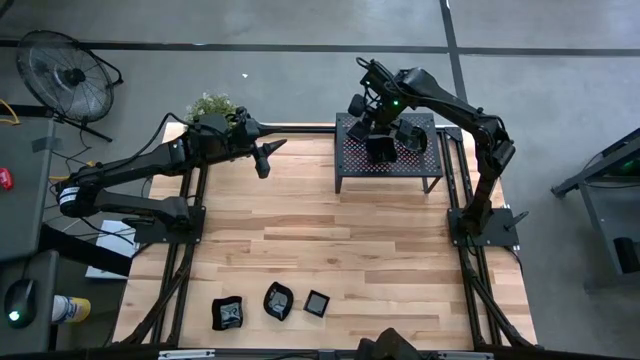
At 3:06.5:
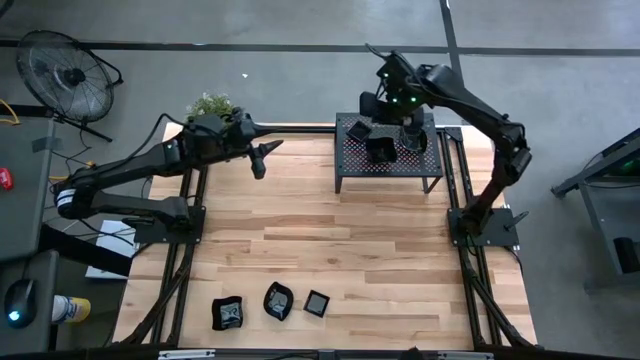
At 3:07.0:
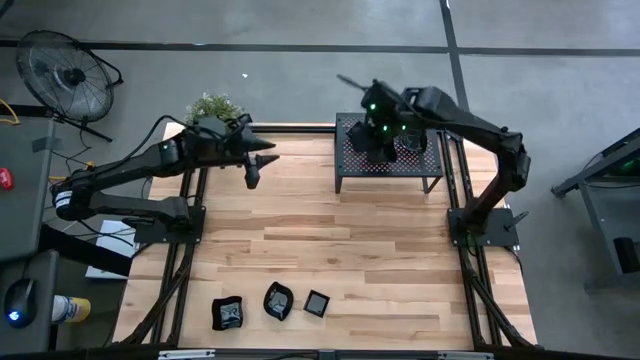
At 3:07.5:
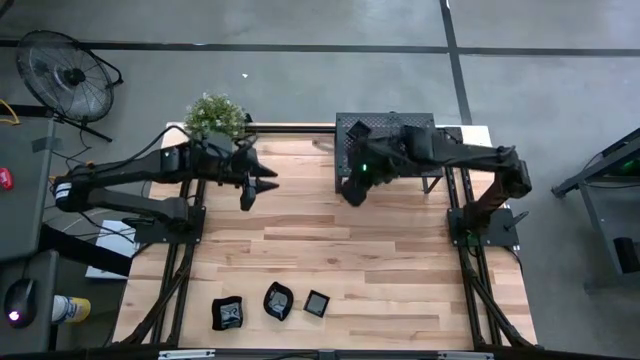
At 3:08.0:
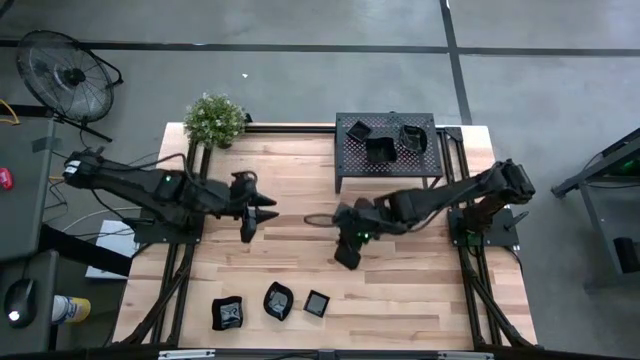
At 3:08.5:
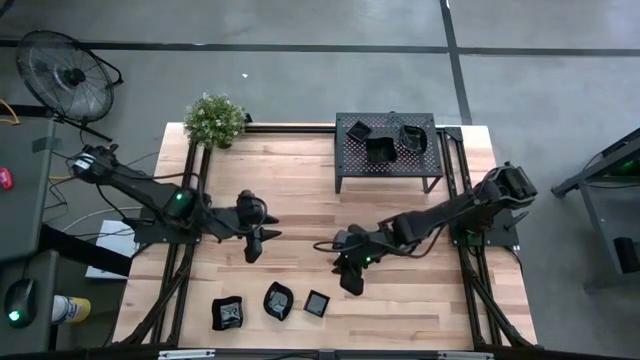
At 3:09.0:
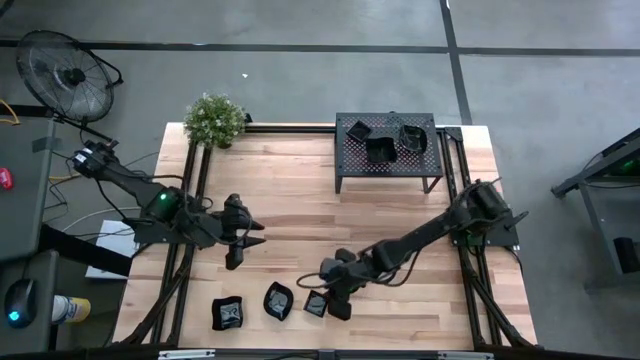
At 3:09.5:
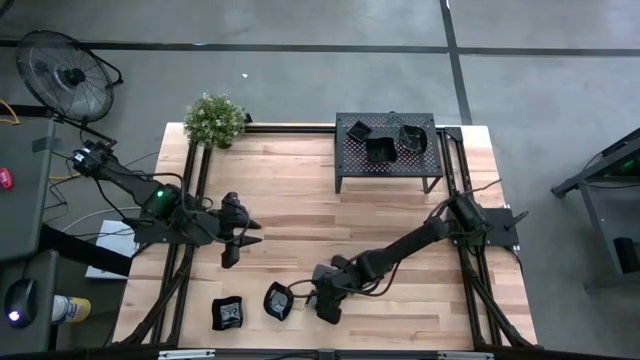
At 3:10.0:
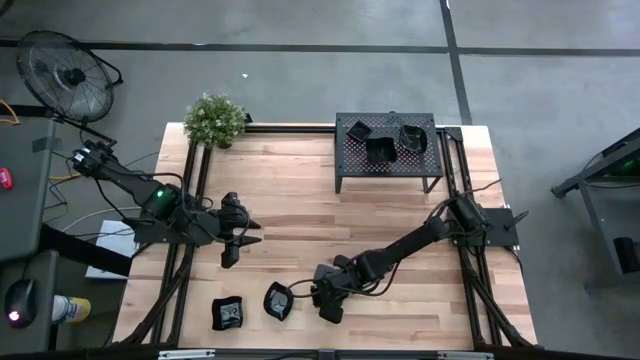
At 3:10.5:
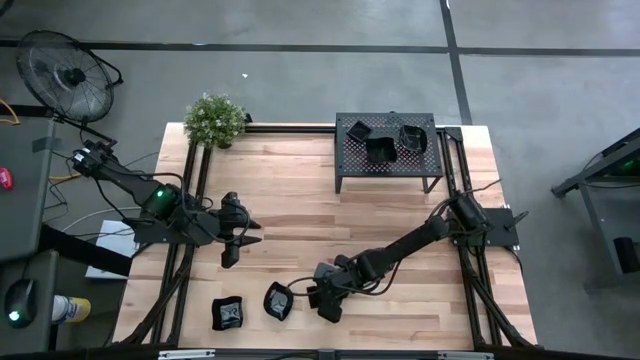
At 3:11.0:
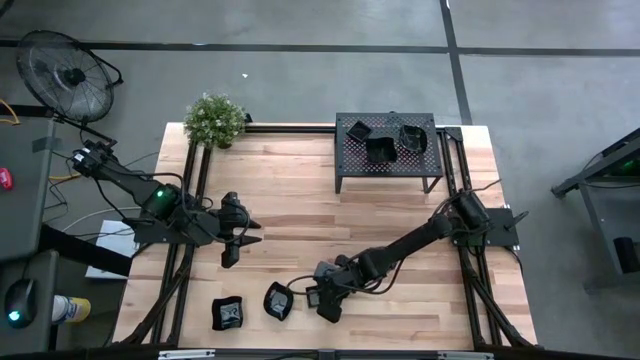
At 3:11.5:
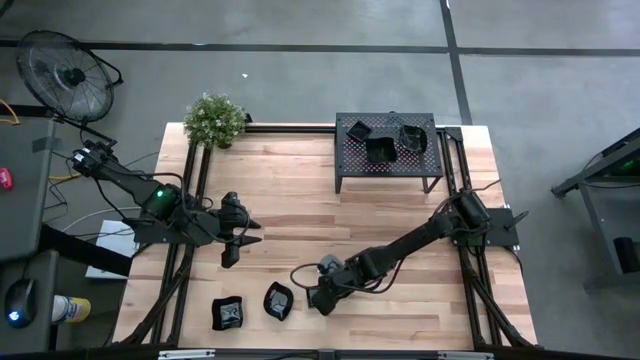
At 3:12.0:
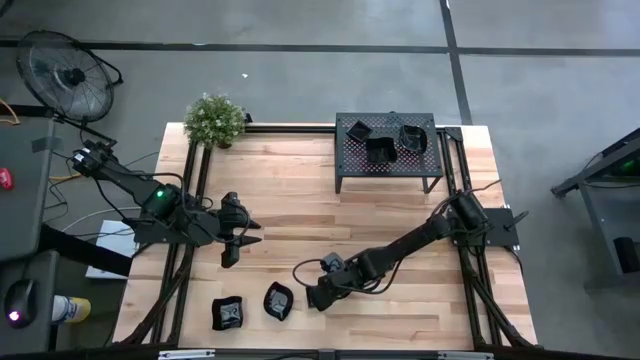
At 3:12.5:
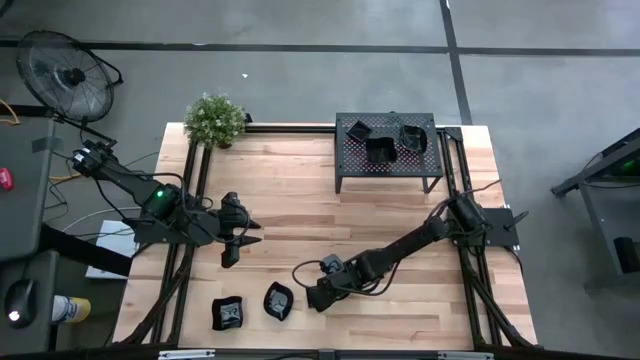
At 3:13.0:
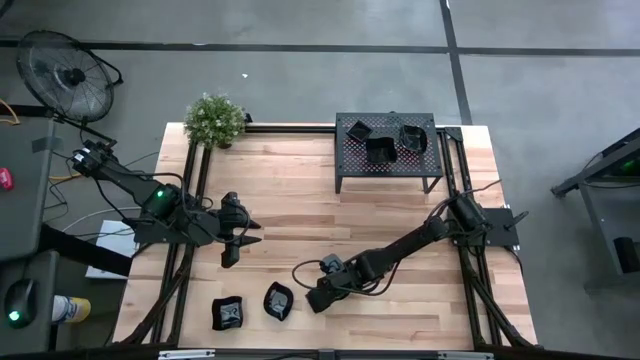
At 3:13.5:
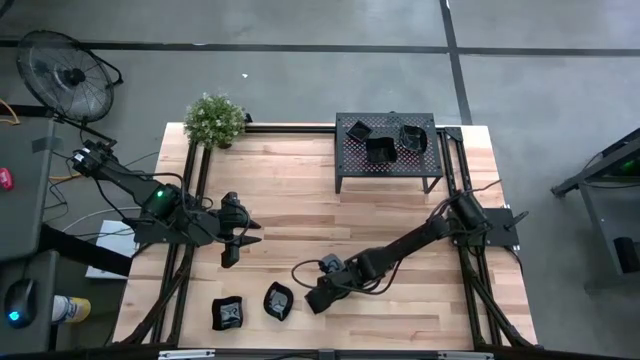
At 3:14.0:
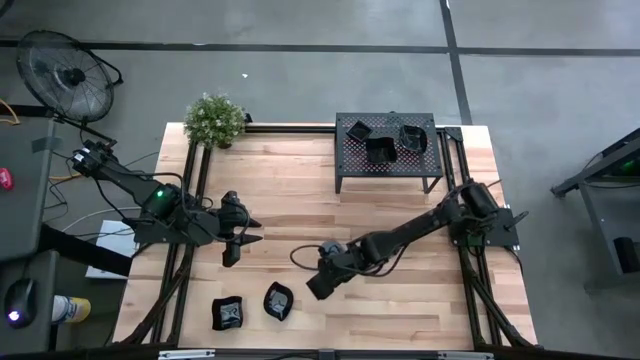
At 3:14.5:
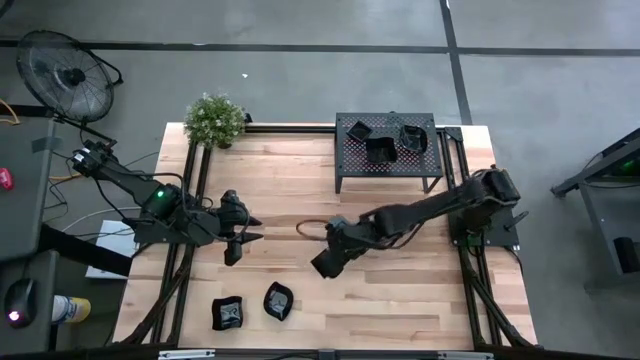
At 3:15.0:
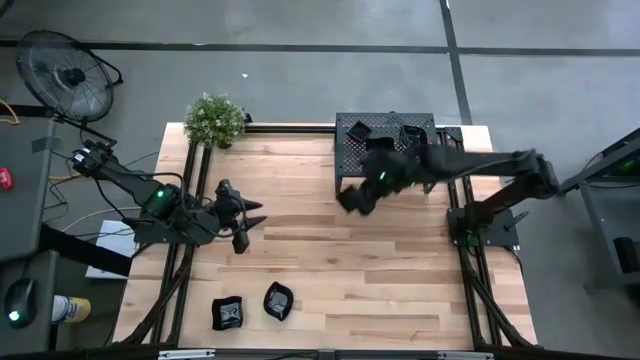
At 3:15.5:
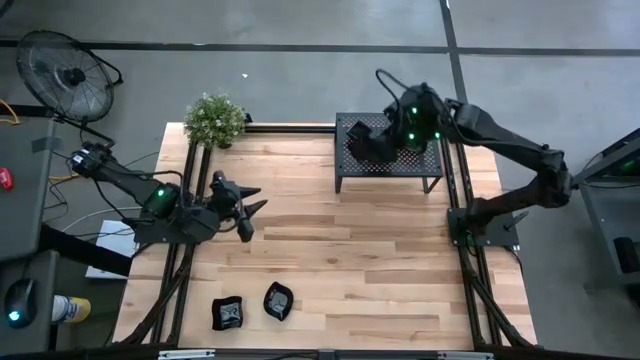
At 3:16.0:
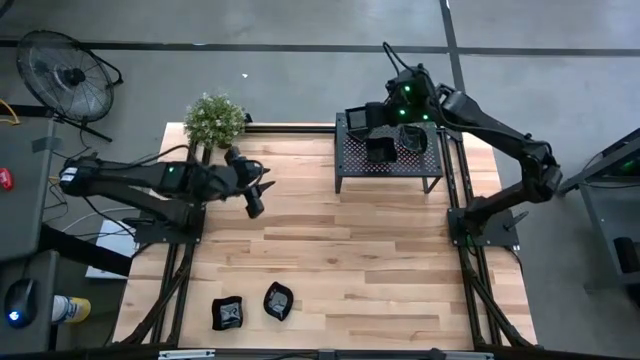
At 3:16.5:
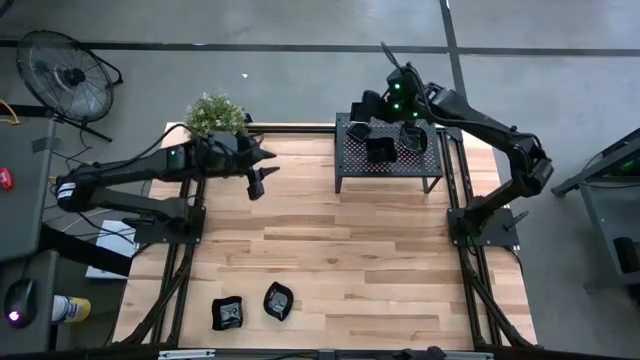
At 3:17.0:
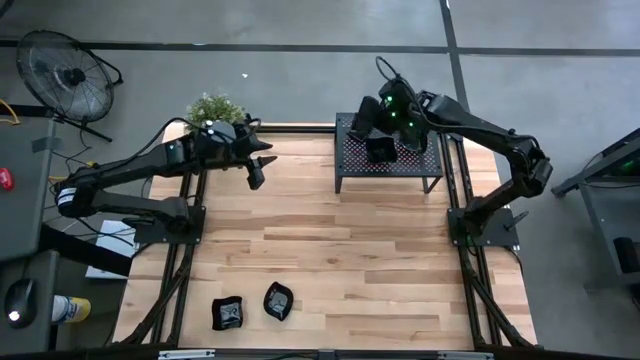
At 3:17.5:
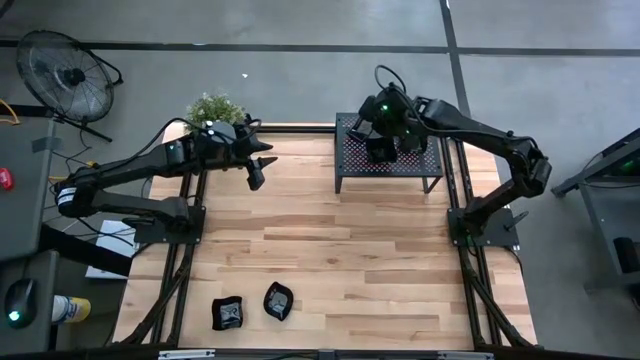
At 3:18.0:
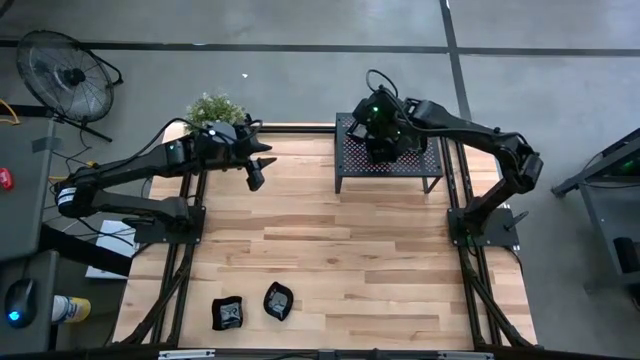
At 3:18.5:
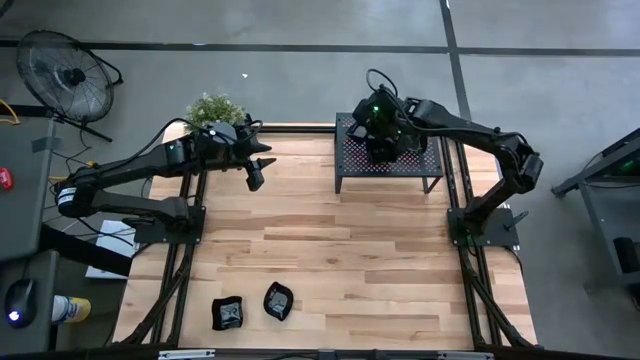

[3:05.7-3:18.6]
Task: Pick & Place Mini shaped plates
Stack the black square plate on top of the black square plates on the shelf

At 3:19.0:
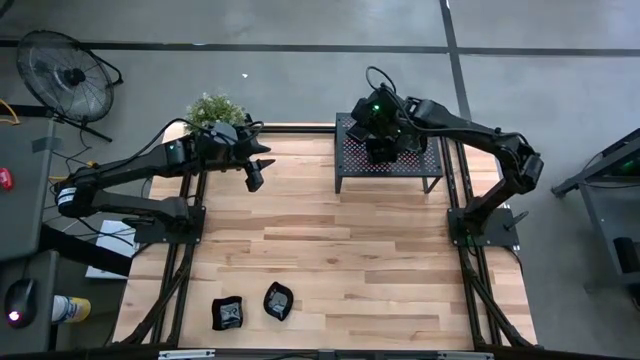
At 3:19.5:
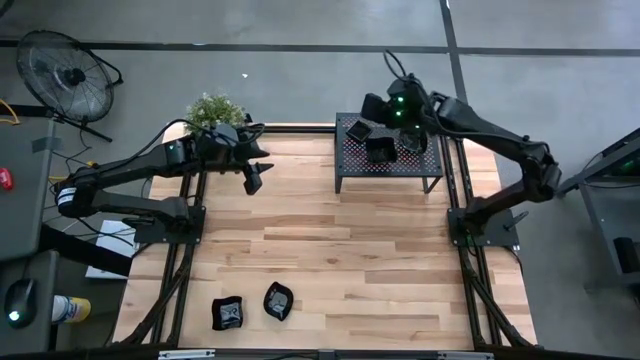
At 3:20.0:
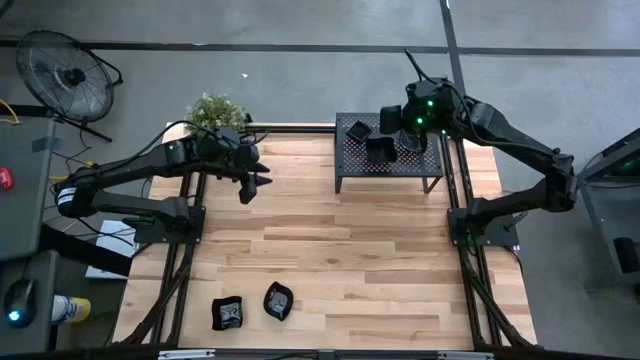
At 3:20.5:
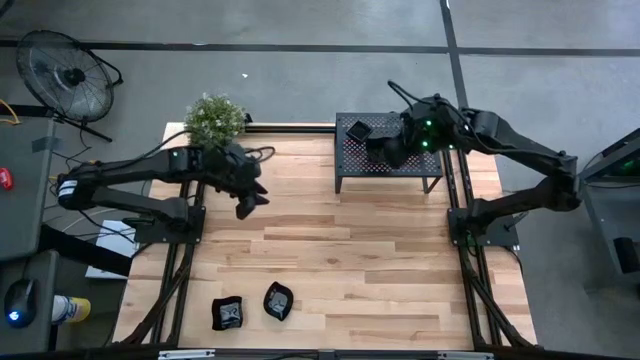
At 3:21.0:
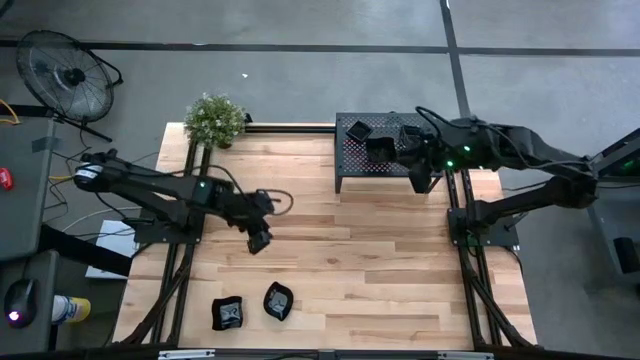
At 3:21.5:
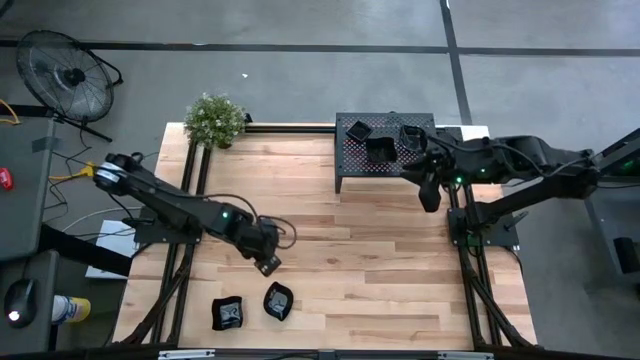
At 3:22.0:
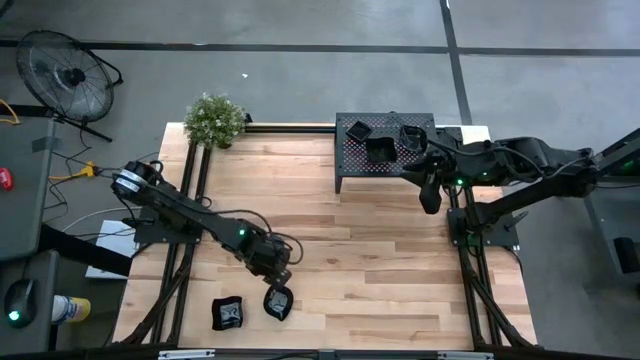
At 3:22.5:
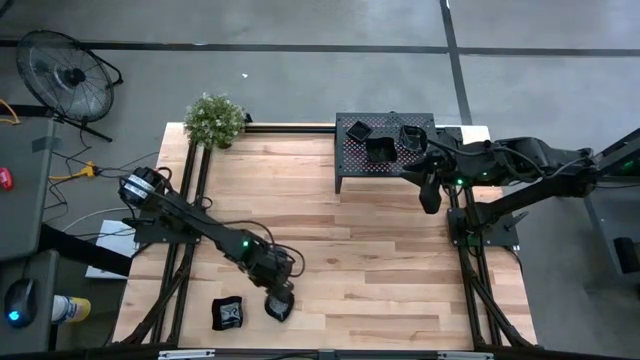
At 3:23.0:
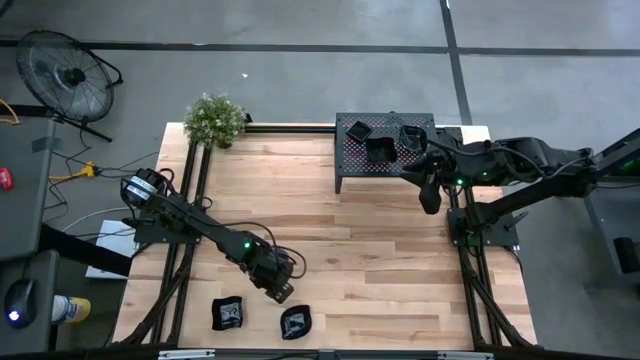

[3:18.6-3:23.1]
Stack the black leaf-shaped plate on top of the black leaf-shaped plates on the shelf
